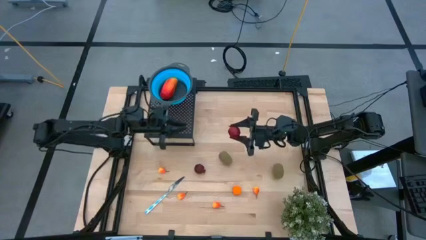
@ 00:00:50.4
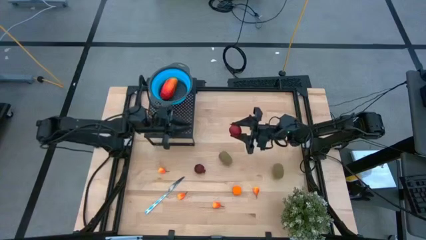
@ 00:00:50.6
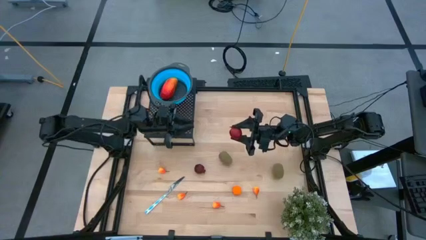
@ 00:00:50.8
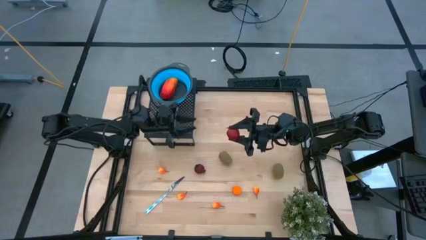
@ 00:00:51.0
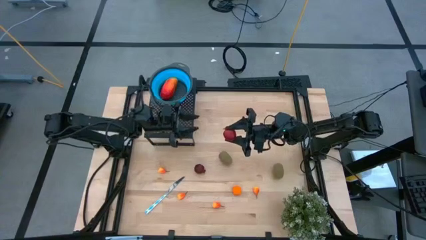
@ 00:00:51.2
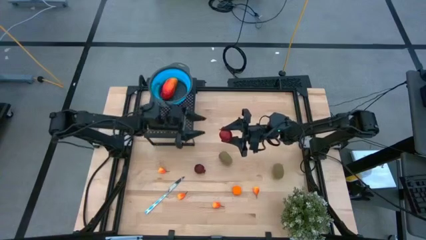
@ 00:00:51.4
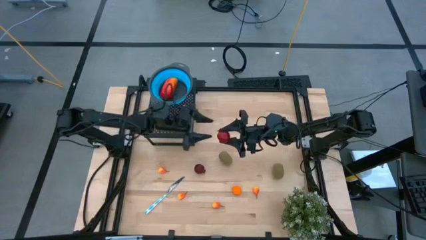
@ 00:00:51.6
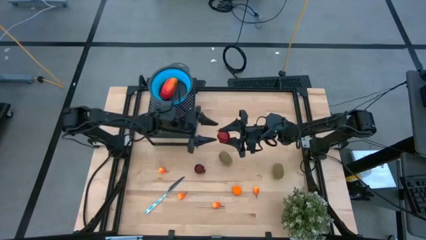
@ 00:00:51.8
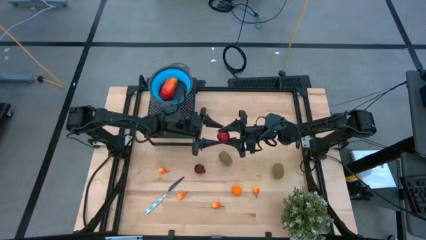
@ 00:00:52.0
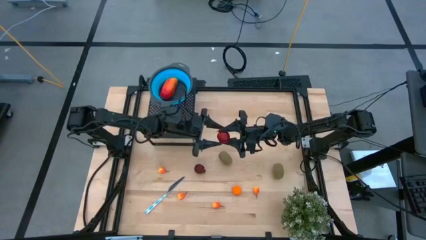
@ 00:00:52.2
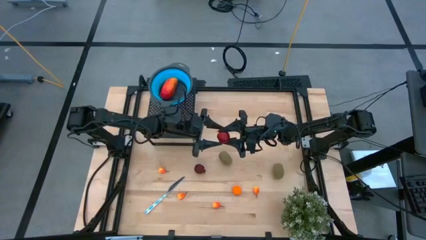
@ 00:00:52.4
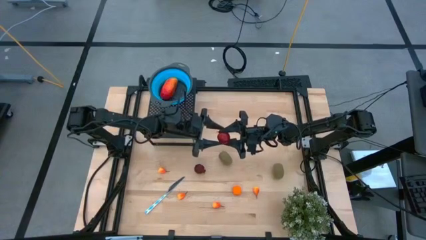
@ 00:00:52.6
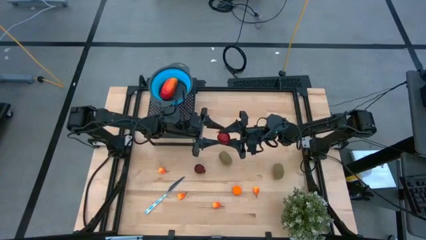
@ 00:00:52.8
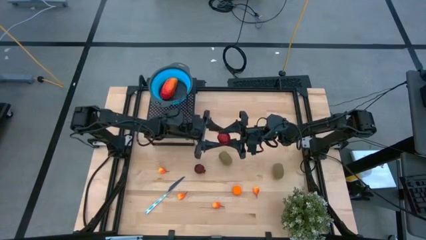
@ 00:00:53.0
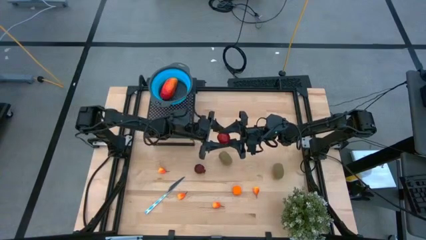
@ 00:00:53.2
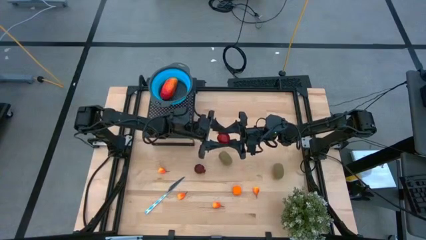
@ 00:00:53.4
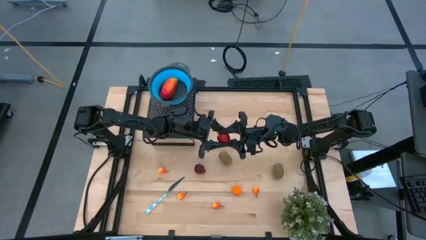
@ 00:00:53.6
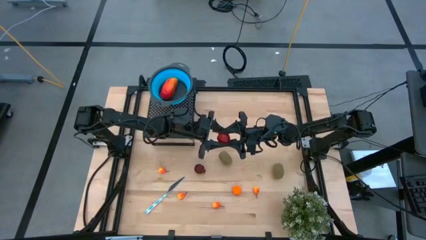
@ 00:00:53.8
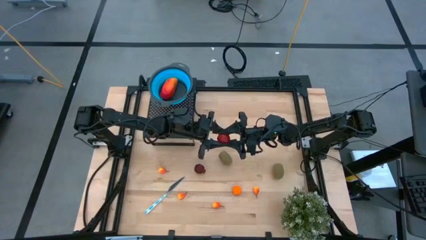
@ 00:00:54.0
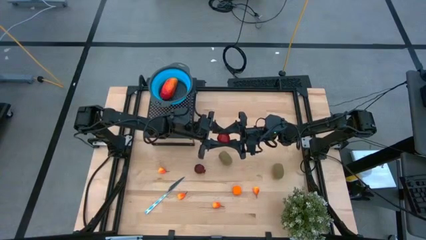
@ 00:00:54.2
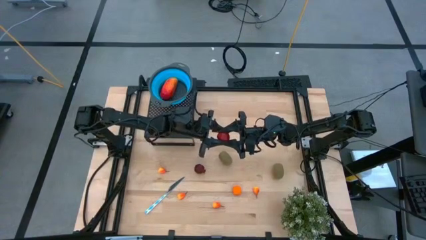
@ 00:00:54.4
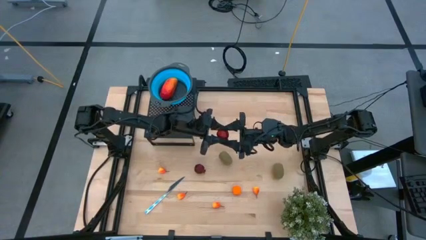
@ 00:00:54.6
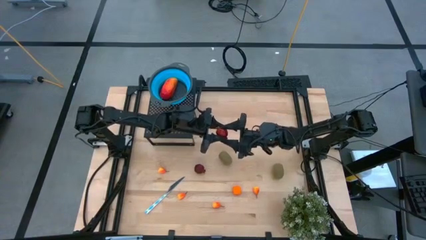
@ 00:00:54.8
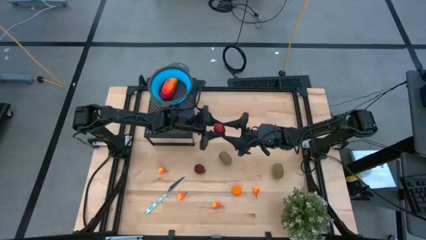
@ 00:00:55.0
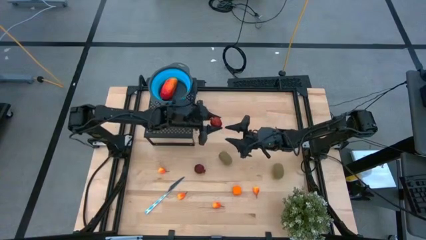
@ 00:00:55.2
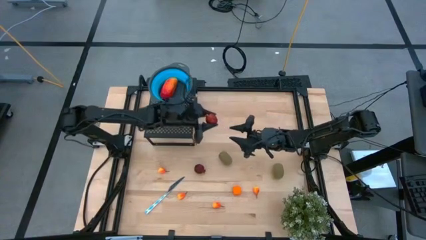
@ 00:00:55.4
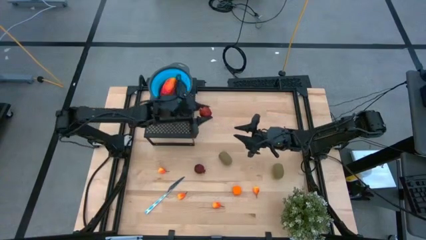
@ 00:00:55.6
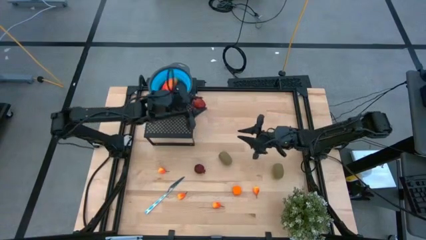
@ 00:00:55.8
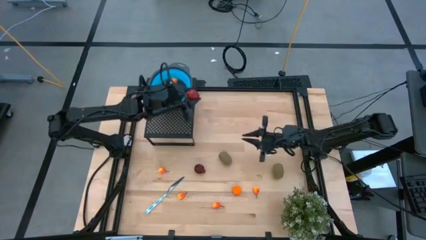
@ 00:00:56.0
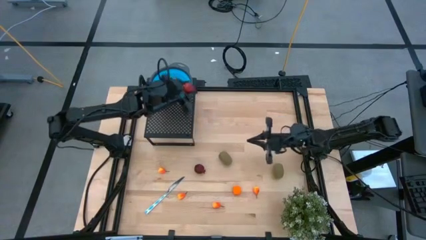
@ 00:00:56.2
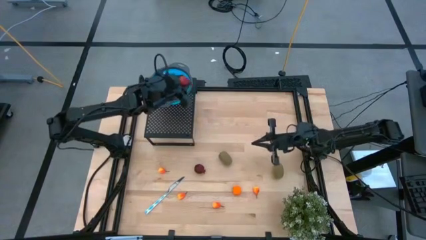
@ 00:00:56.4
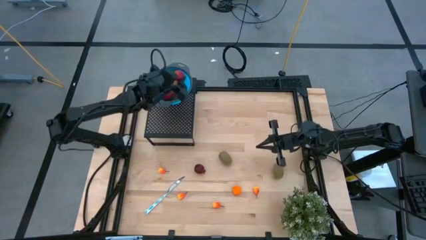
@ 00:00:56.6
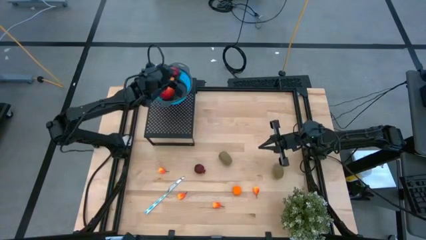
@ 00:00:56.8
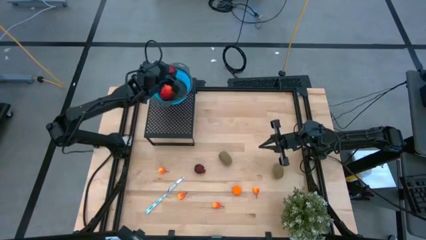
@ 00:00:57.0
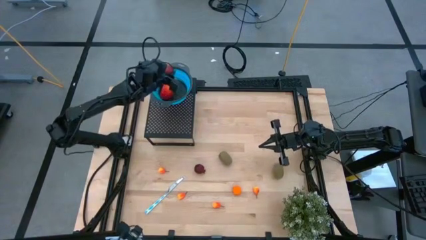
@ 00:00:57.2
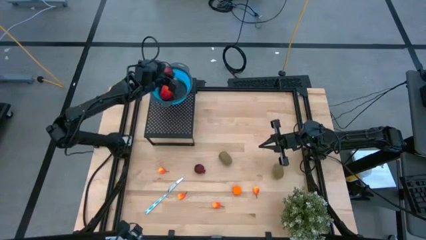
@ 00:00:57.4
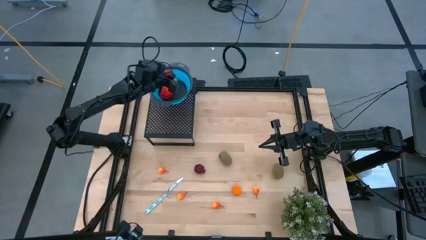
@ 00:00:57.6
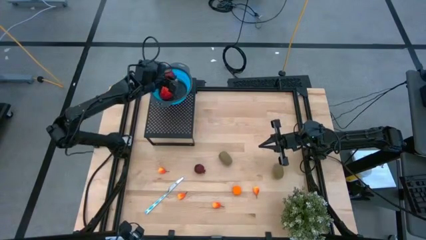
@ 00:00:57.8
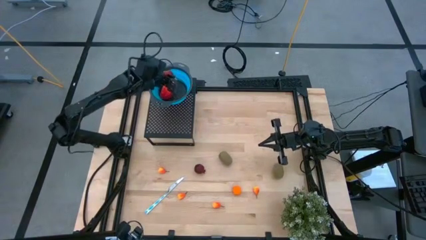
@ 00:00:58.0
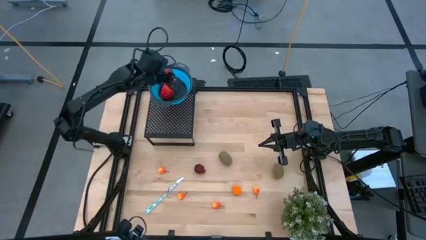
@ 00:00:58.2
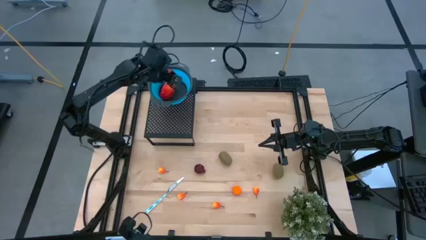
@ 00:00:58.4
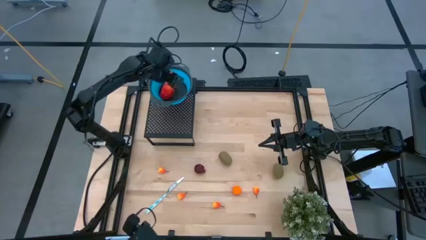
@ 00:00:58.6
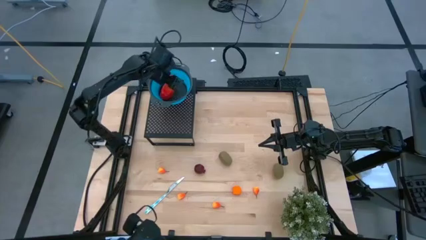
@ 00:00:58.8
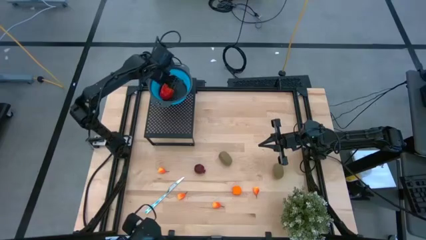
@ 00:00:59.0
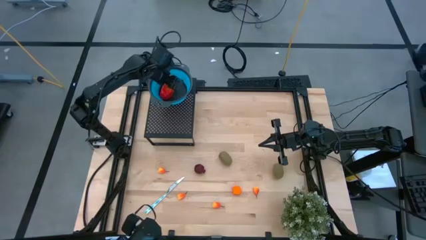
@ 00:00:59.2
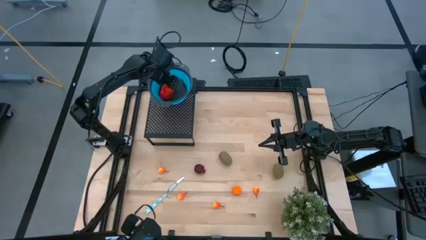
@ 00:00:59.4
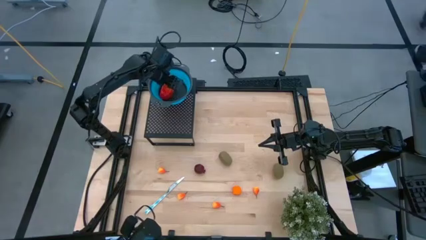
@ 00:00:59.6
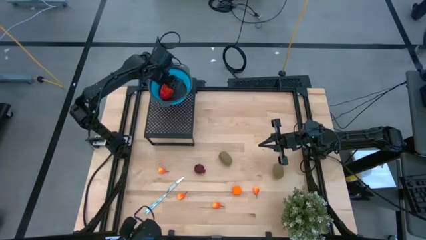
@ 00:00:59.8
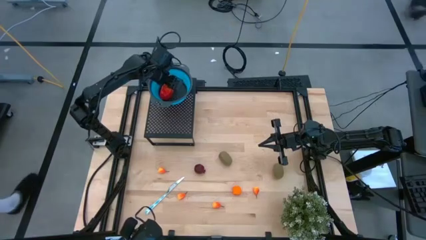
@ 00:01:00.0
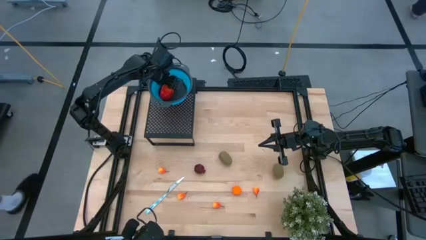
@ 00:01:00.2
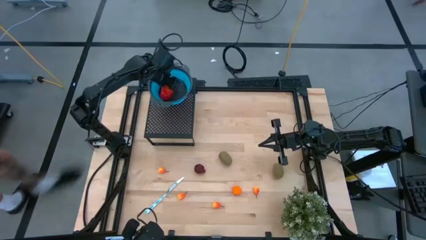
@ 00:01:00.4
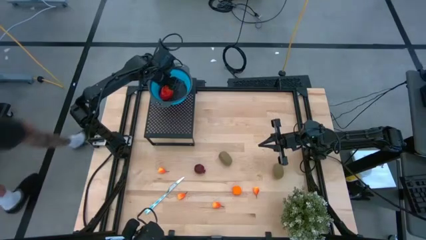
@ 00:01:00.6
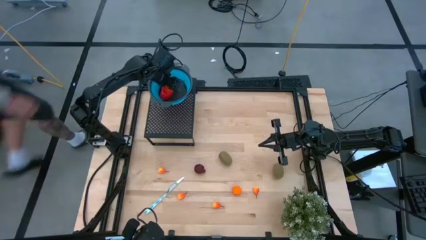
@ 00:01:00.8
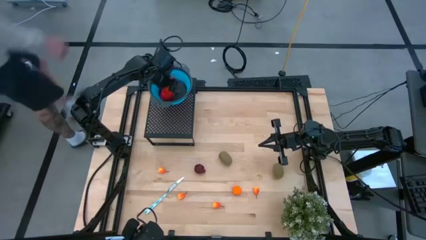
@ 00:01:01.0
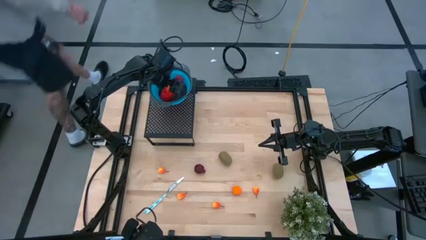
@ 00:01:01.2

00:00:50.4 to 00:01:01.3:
Task: Pick & Place Fruit
Put the right pomegranate into the blue strainer bowl on the shelf

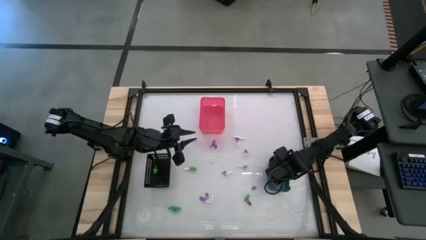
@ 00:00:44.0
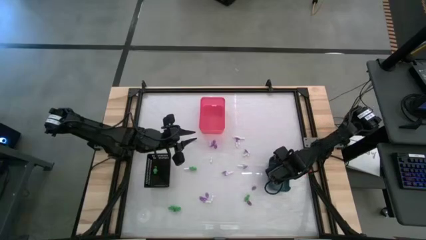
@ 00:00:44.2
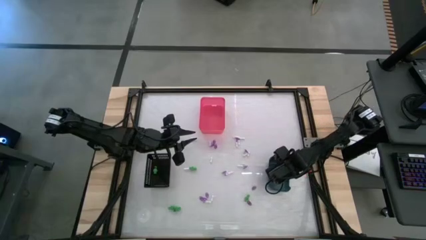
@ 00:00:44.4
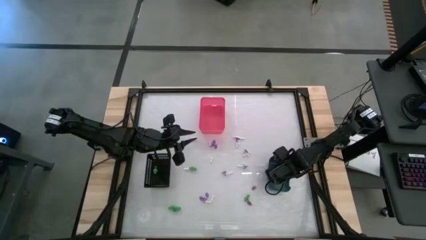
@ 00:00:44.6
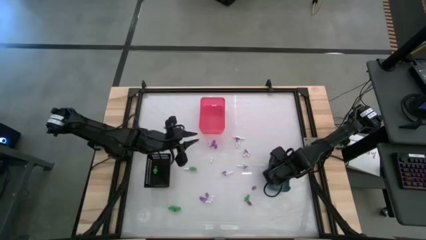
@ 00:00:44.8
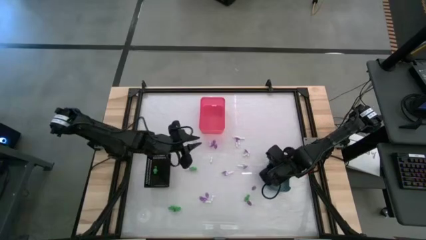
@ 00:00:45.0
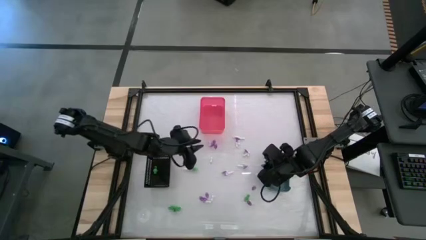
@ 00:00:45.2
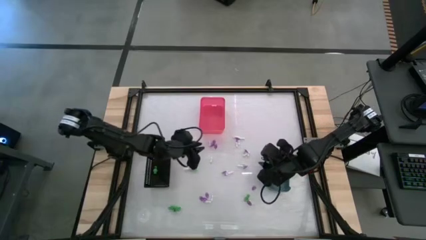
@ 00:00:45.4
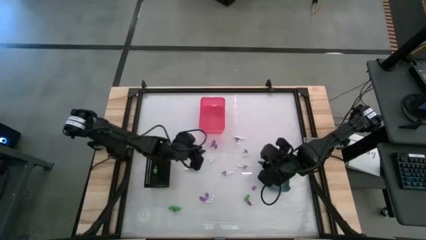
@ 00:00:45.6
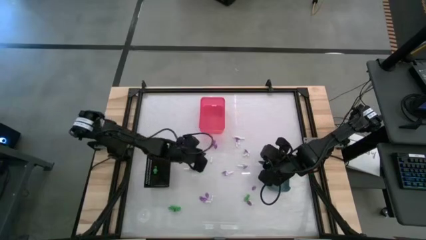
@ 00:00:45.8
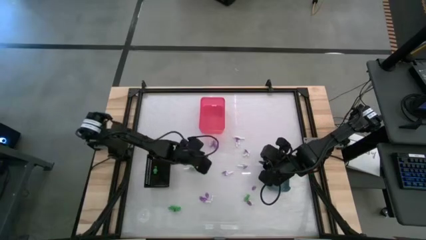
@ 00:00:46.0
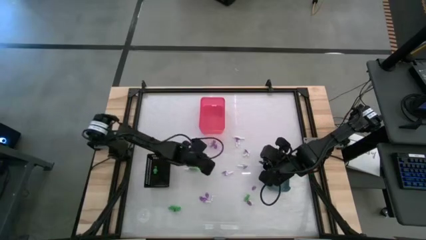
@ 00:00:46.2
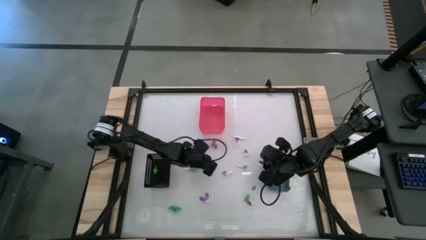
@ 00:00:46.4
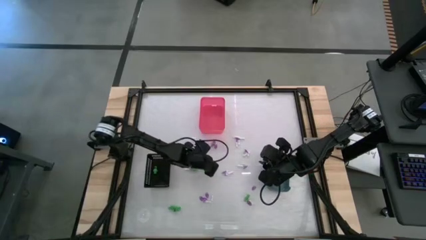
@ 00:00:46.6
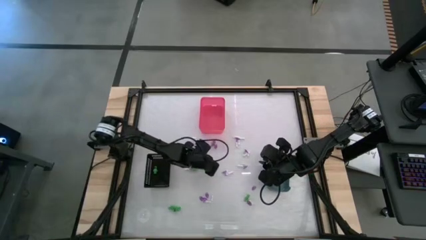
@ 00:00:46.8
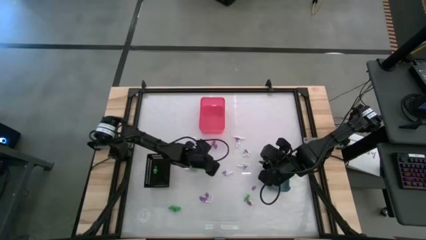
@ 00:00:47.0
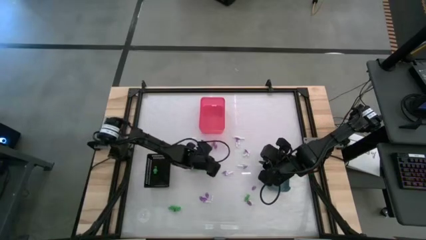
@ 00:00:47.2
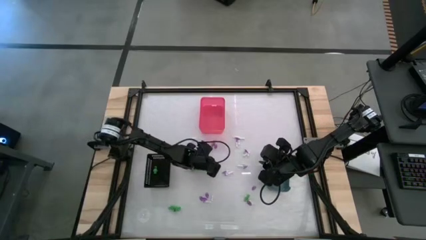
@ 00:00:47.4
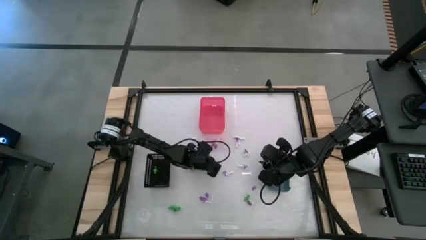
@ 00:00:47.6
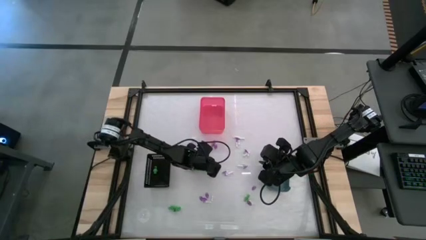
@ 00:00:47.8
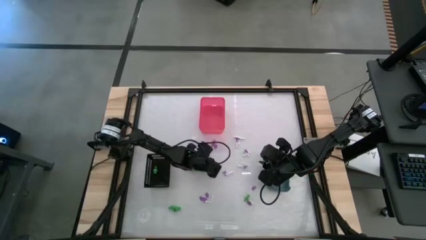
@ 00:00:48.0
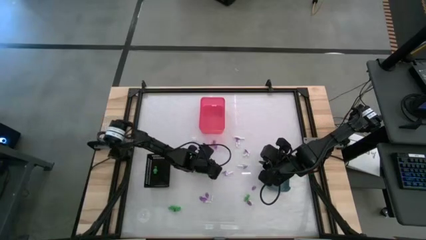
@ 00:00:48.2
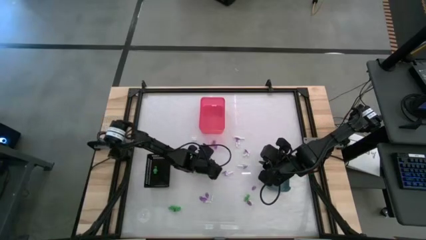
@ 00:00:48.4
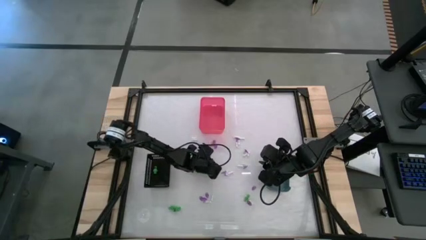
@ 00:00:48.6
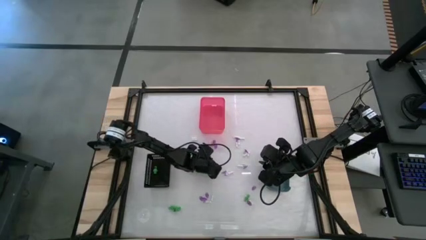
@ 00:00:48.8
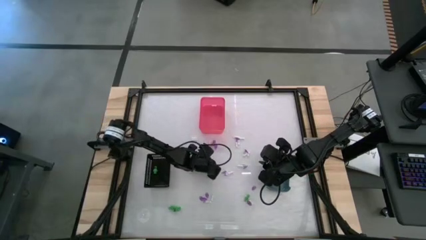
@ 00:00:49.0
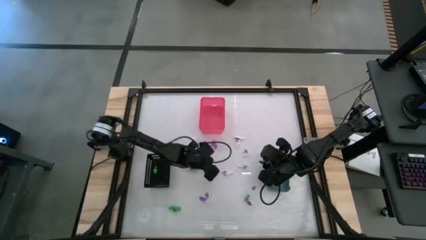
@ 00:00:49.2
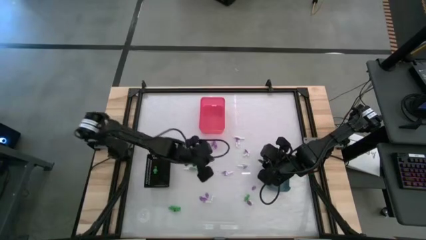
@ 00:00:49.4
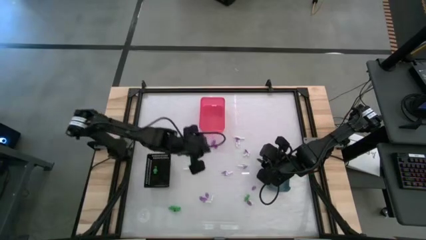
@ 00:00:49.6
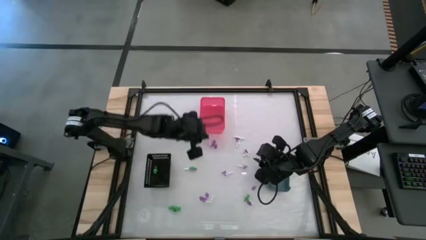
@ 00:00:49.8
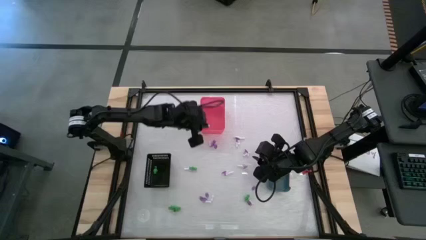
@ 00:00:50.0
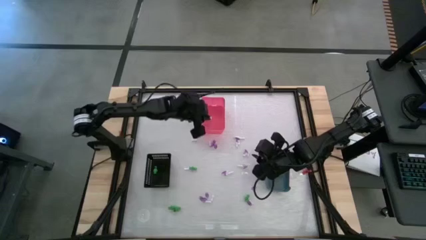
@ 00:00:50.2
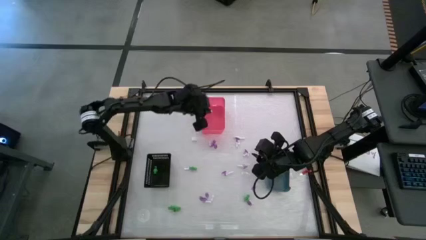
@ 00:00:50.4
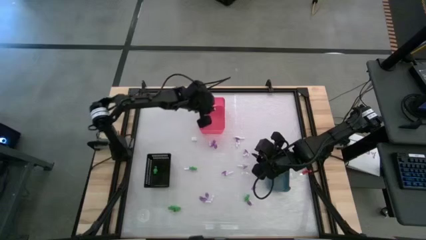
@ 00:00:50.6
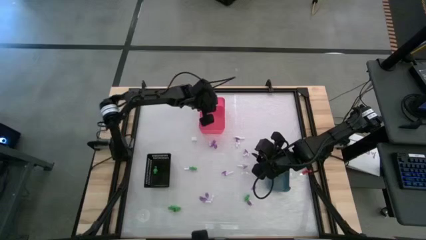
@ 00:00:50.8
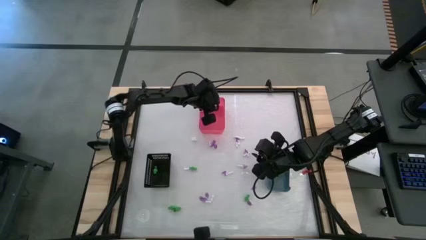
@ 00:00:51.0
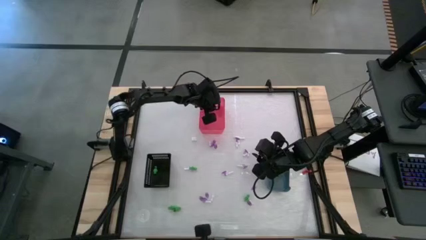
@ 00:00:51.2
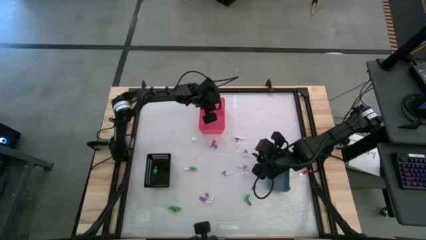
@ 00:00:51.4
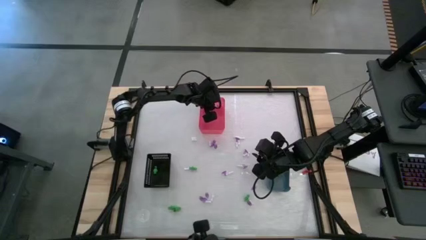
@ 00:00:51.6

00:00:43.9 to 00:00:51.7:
Task: Sort Halloween decoration
Put the bone toy into the red bin
